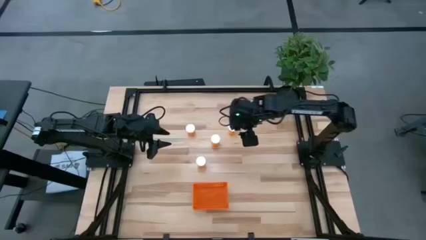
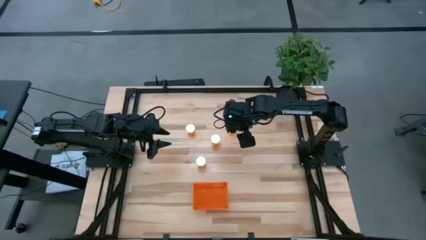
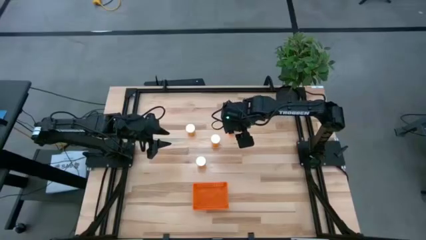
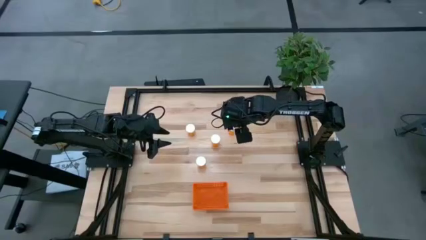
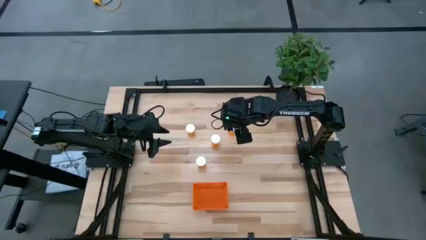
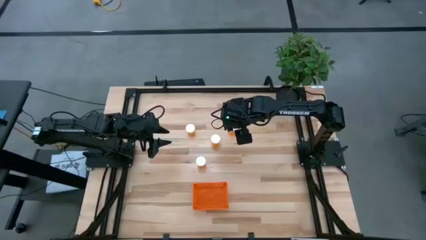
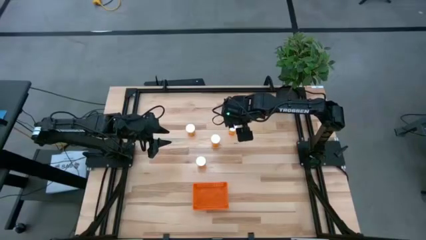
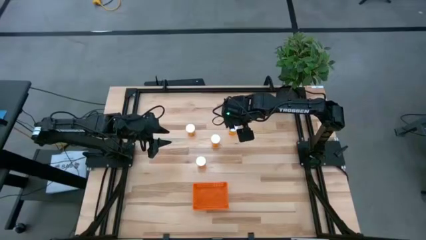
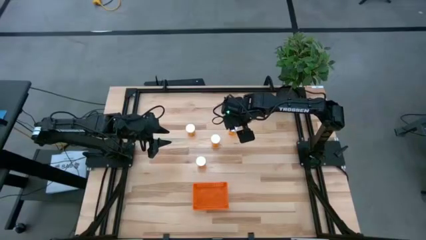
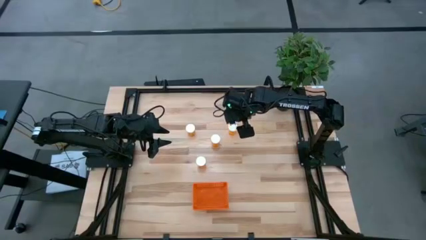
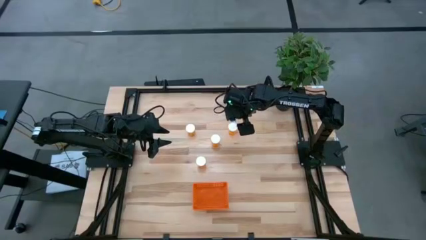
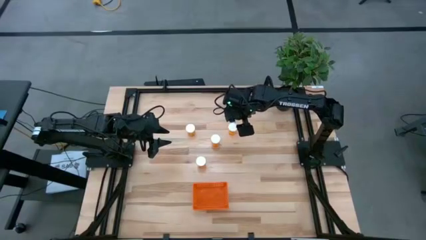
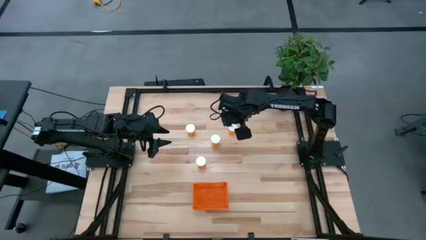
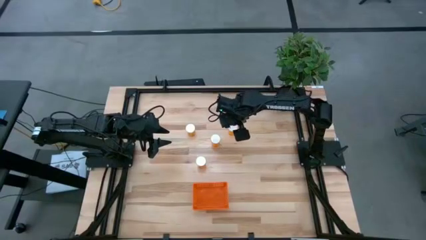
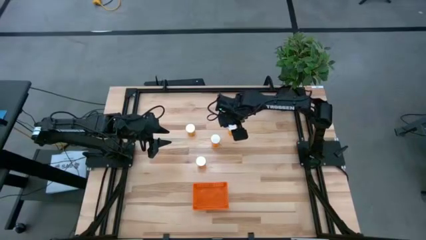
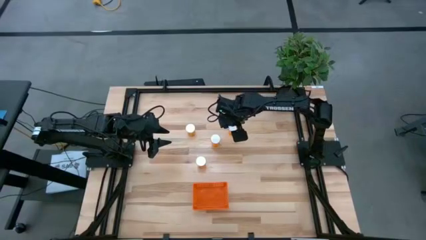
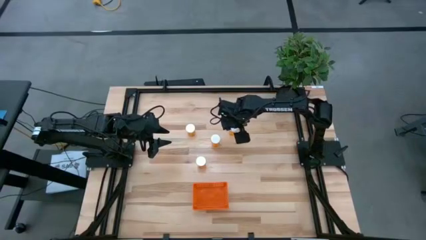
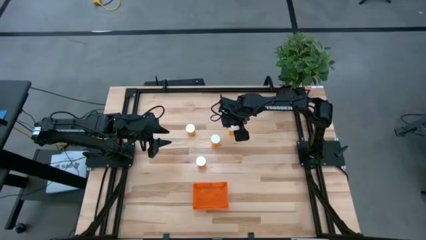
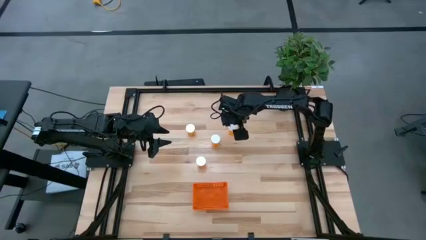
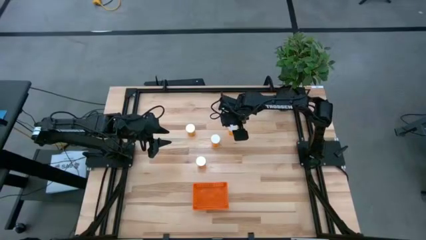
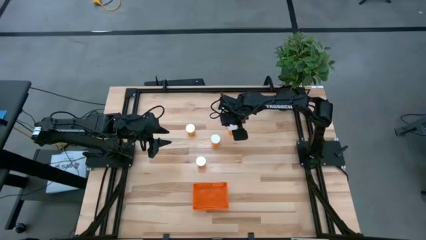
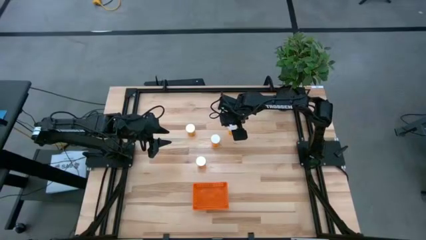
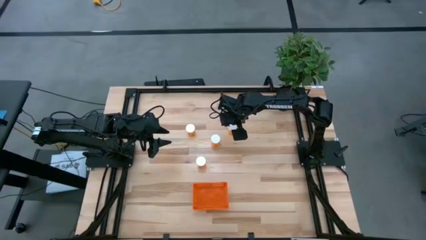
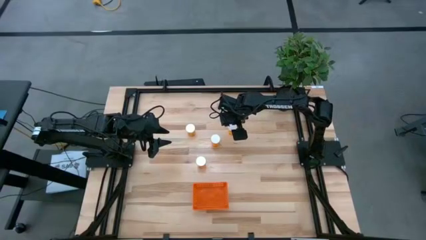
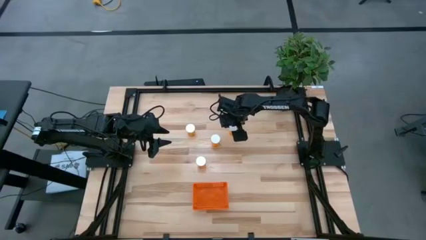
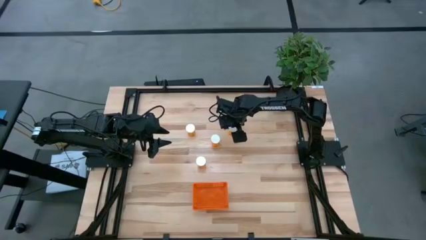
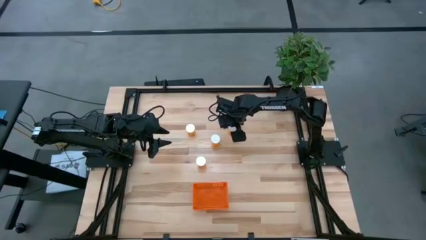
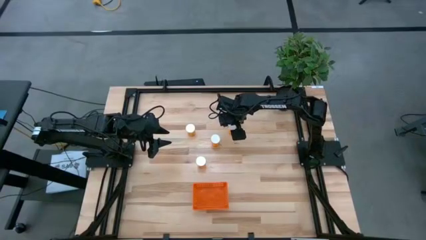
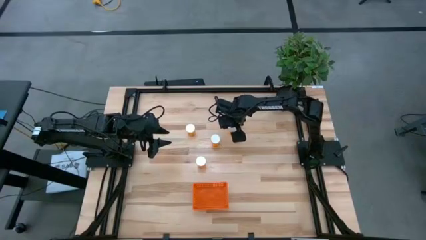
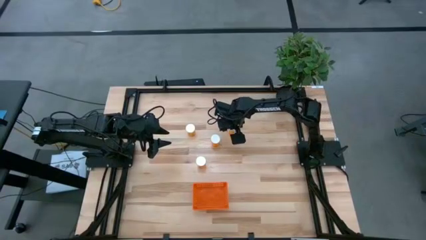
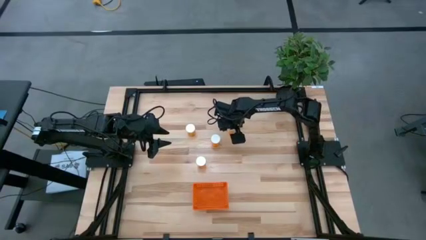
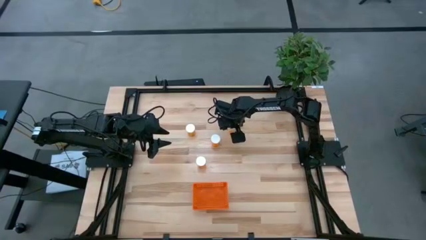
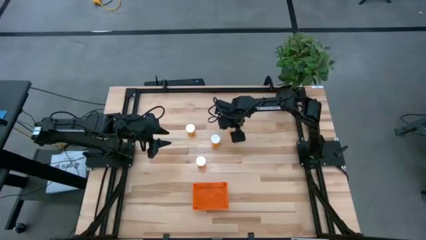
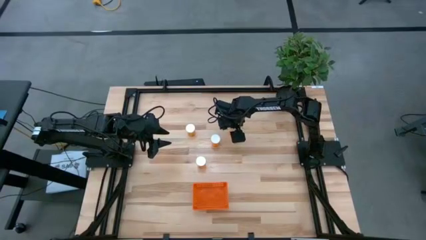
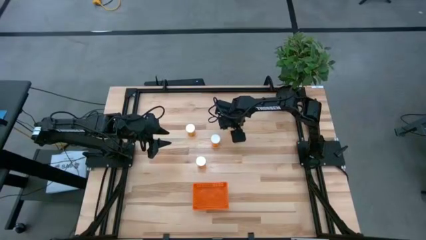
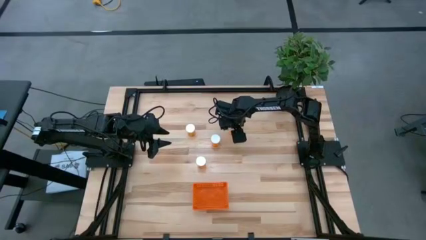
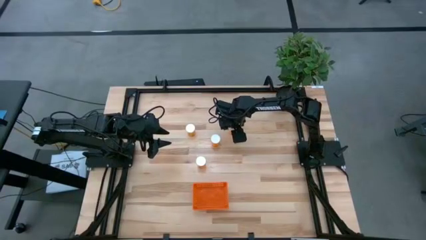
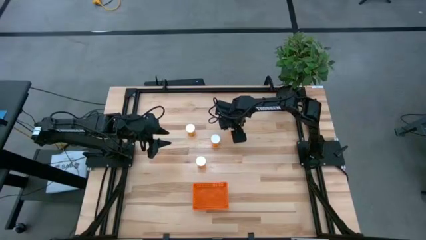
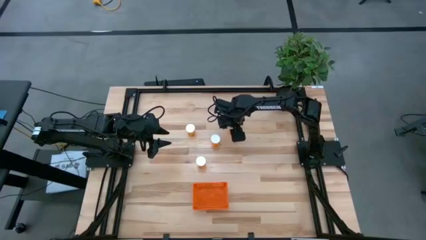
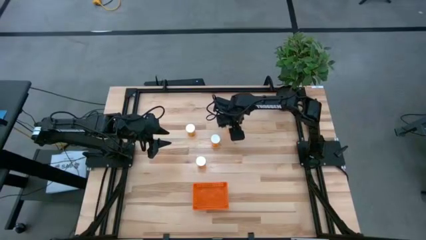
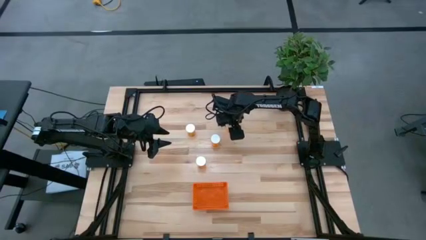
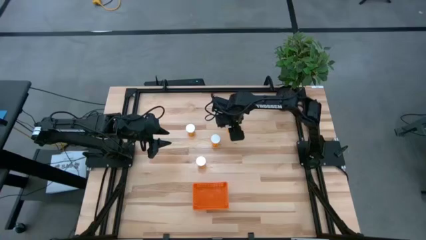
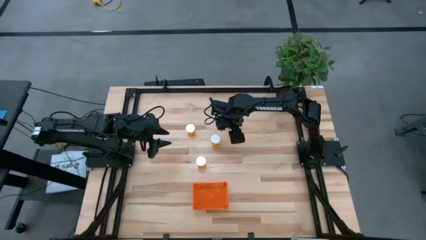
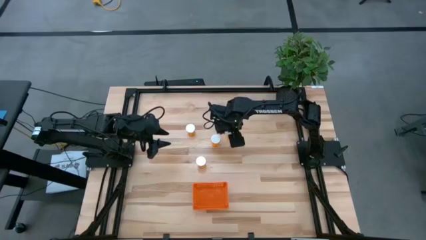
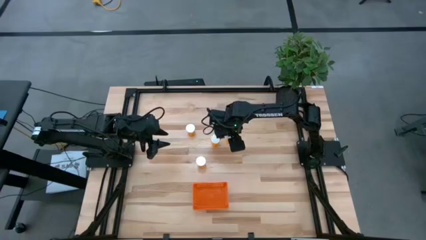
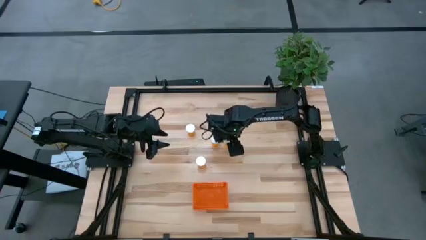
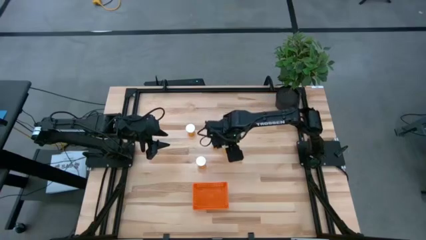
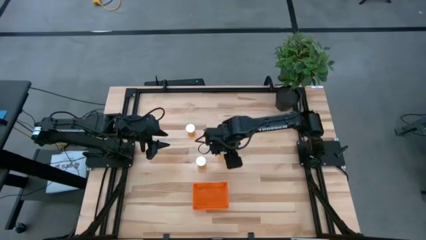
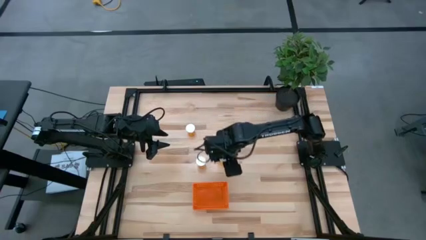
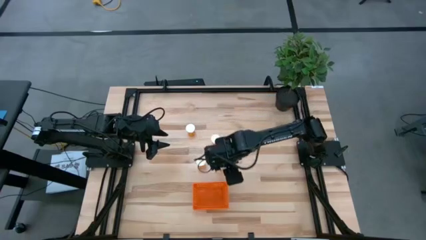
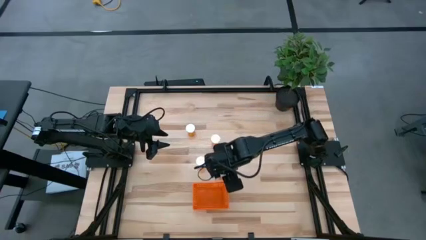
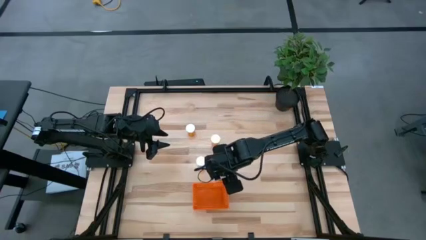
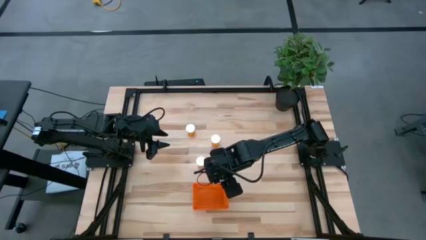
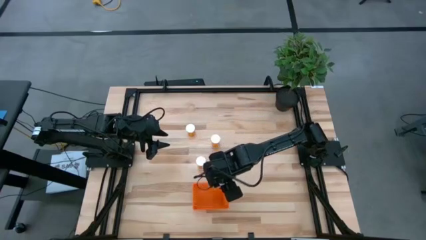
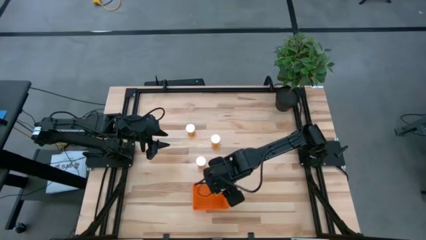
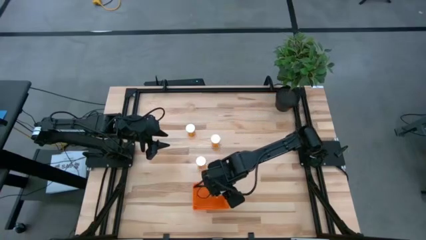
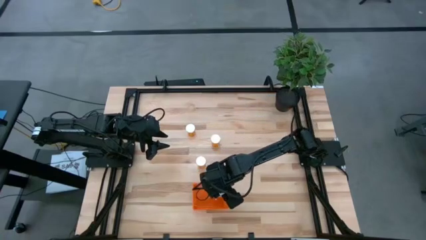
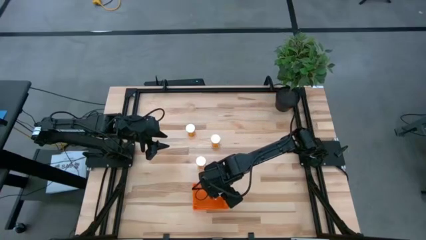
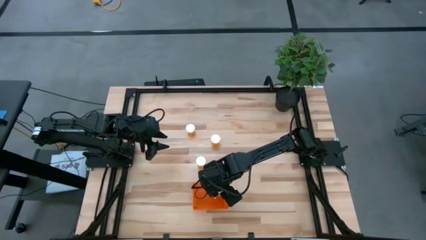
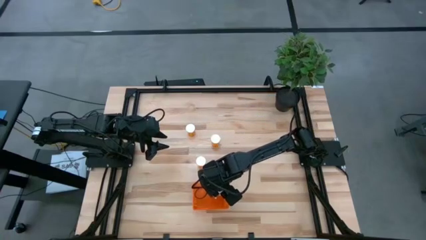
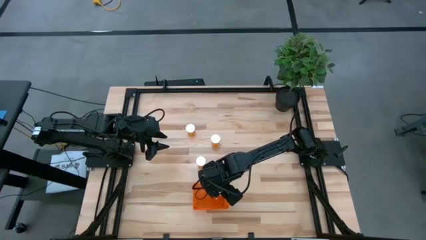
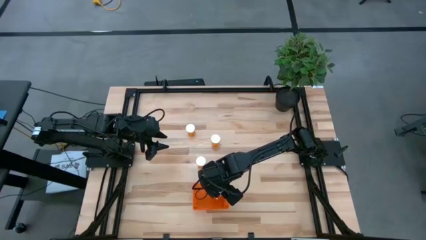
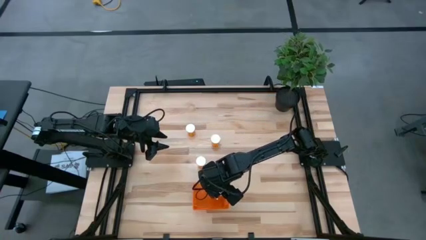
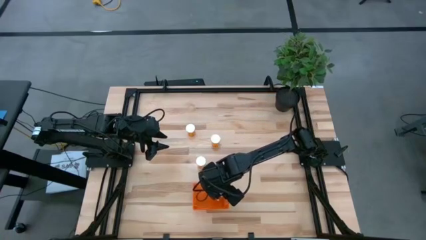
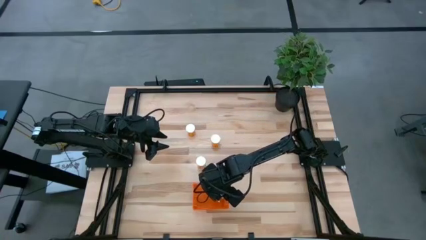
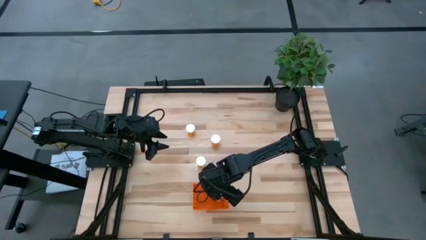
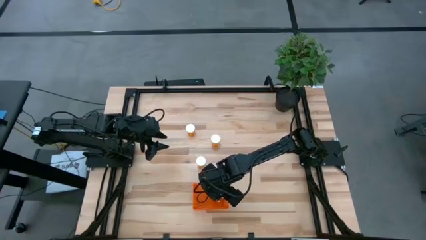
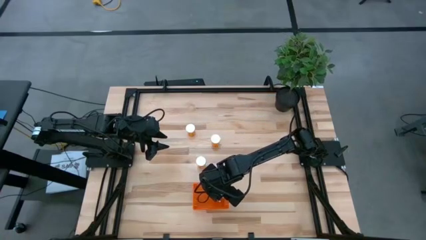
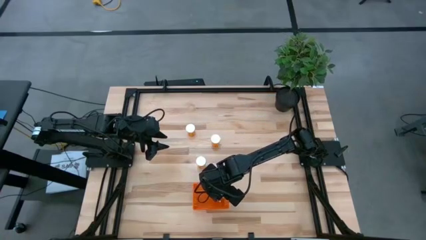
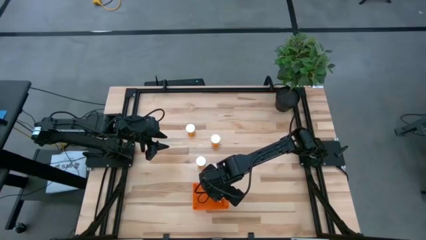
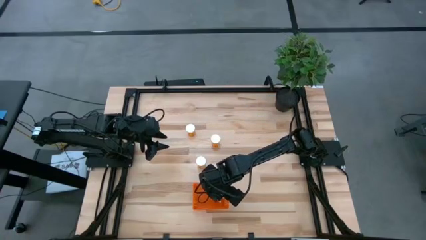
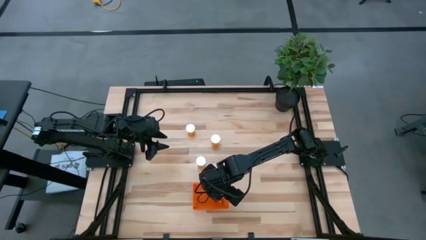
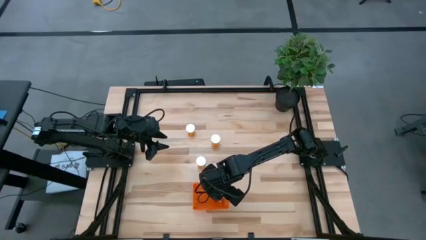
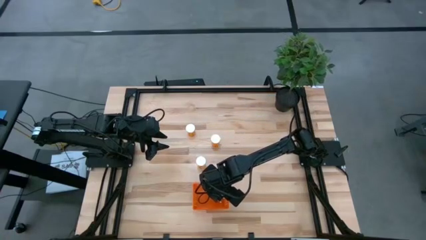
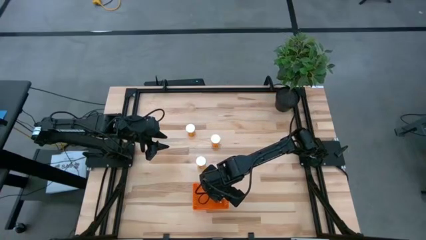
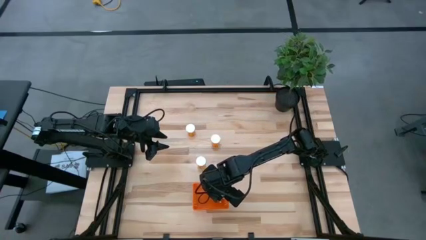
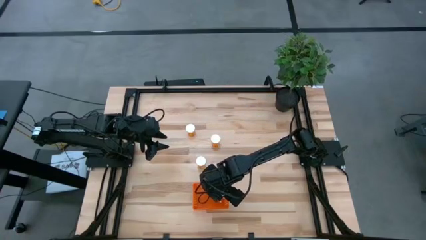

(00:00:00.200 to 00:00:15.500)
Task: Pick and place pill bottles into a basket
Put the orange pill bottle into the orange bin
